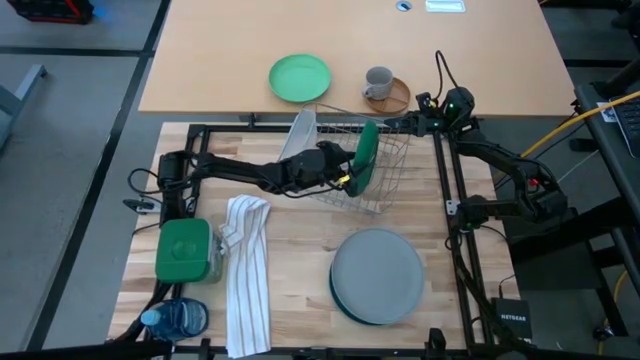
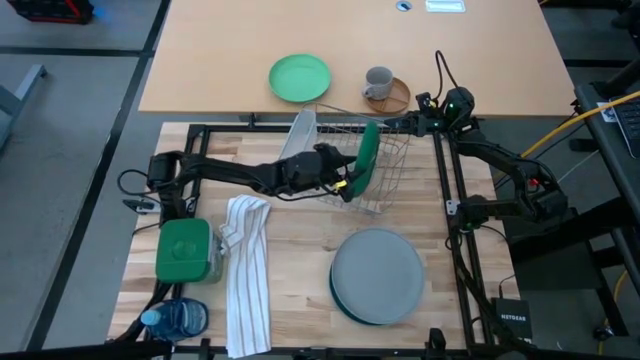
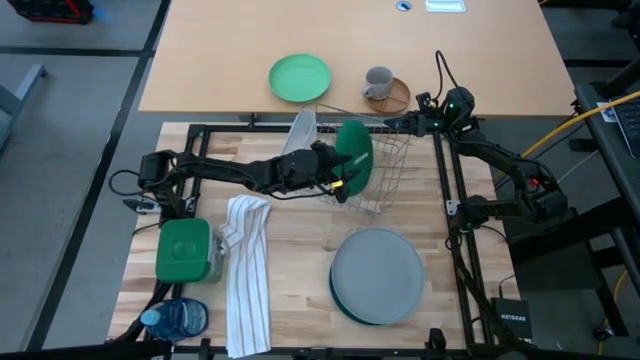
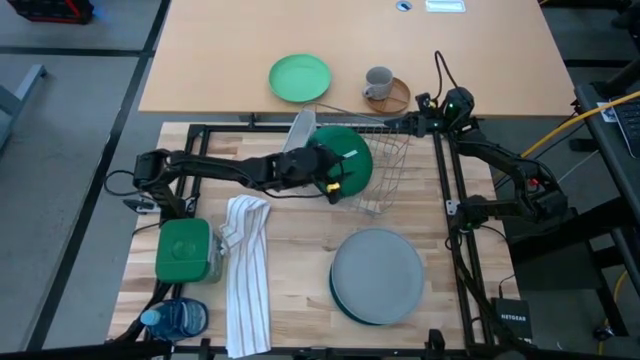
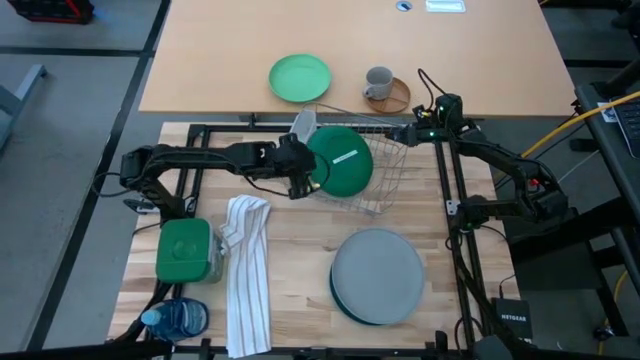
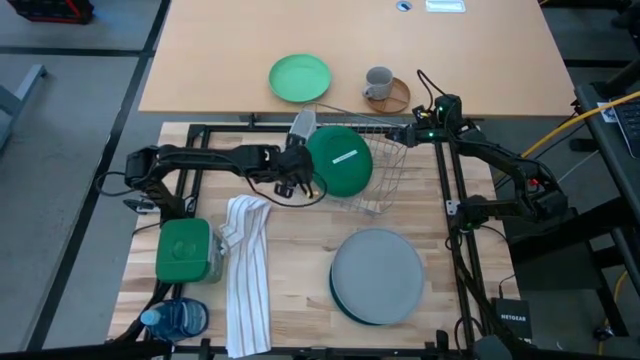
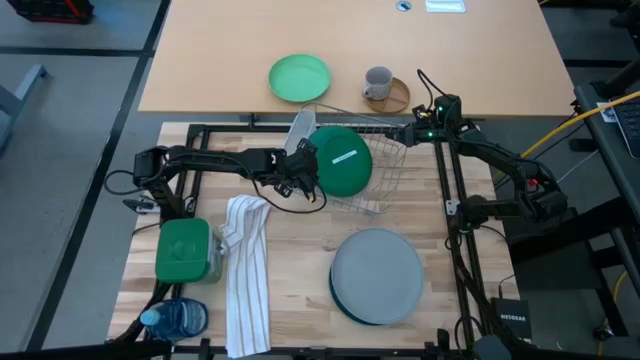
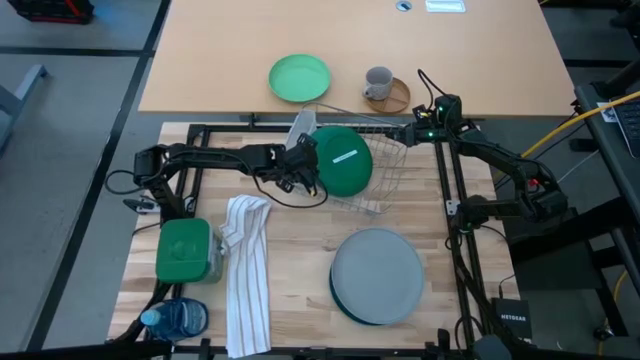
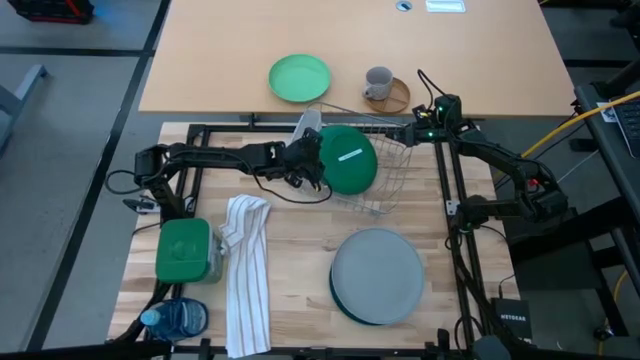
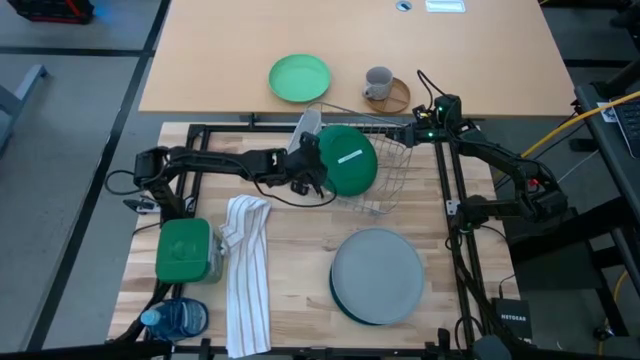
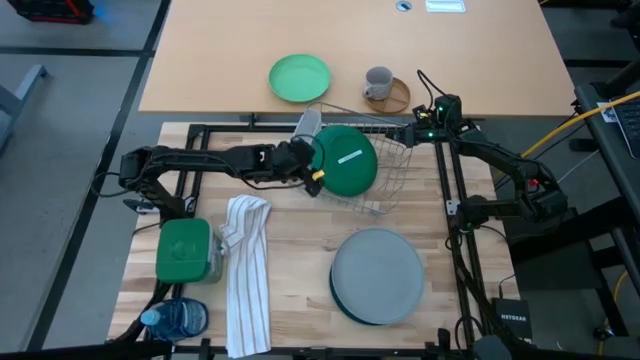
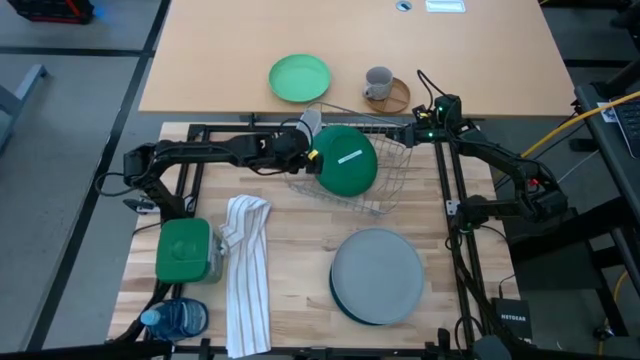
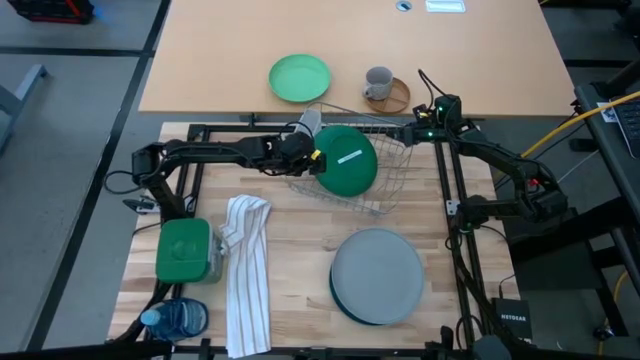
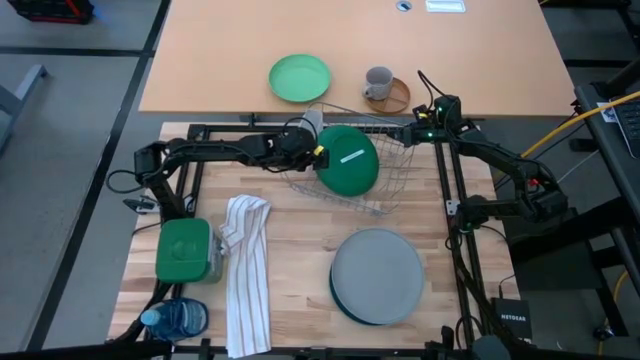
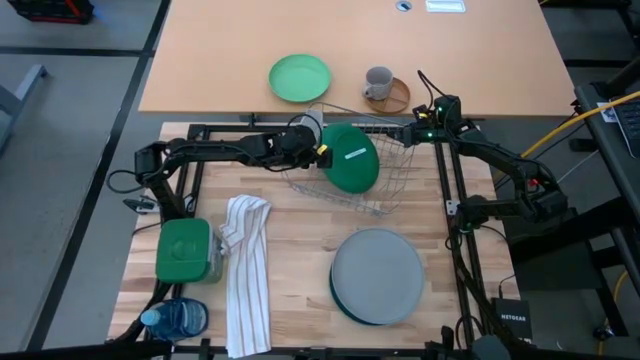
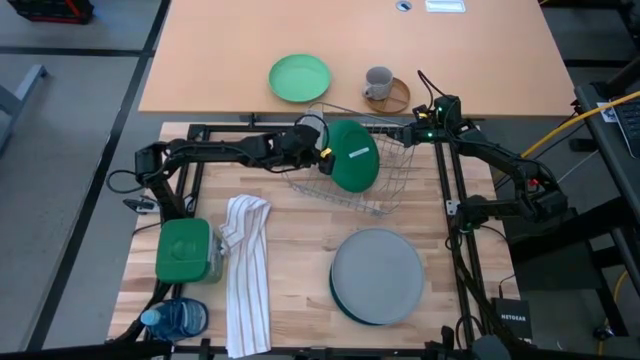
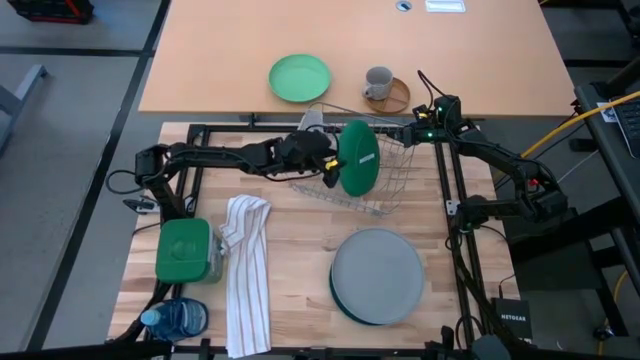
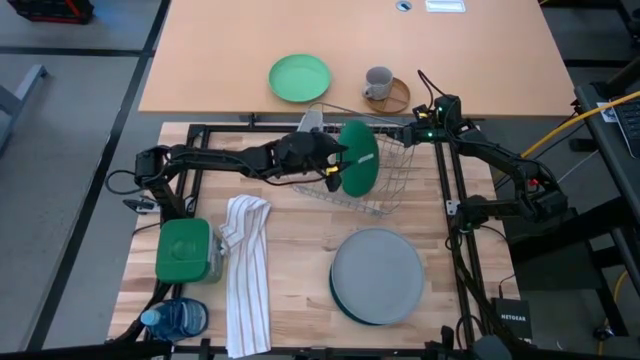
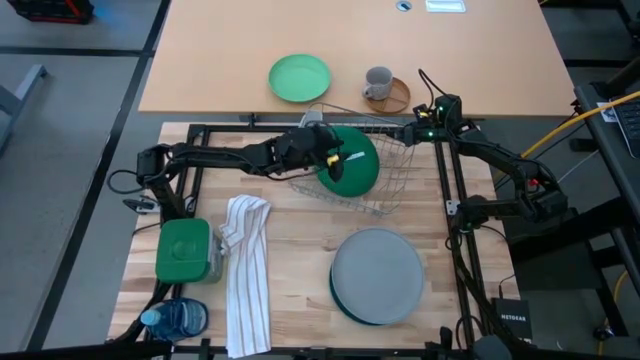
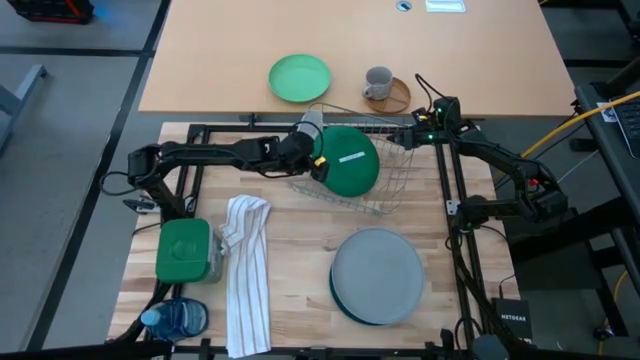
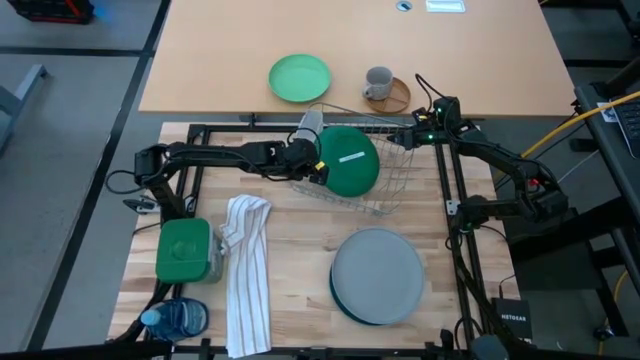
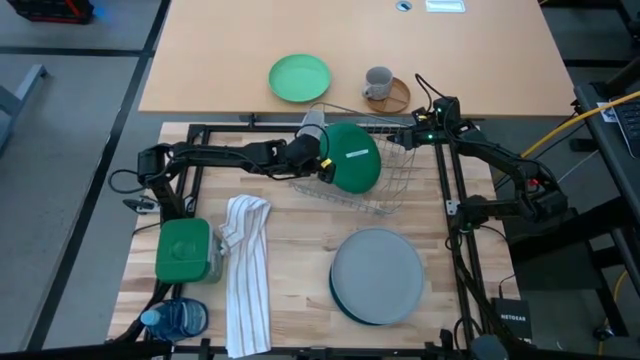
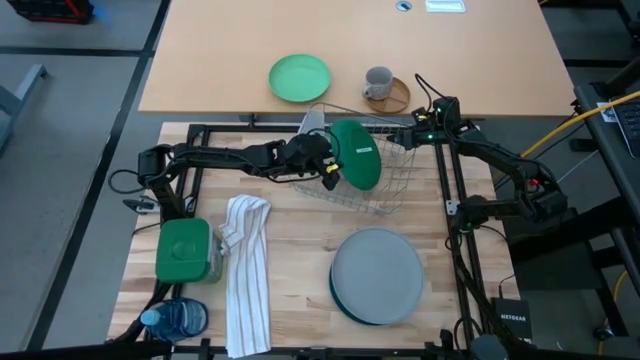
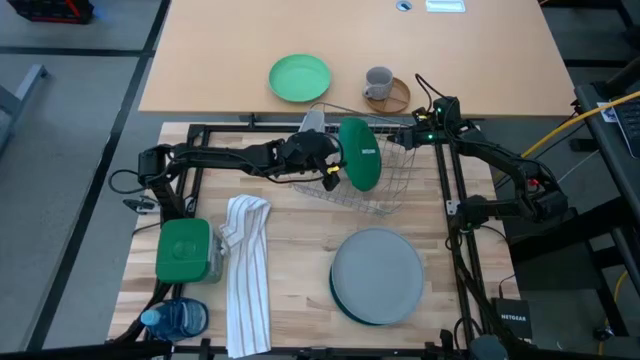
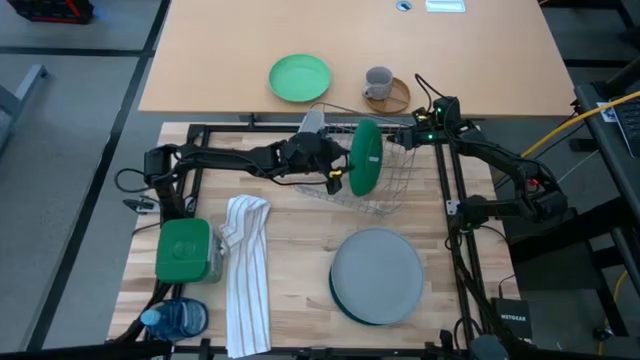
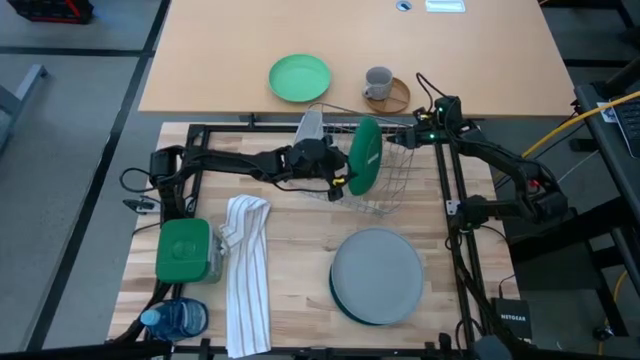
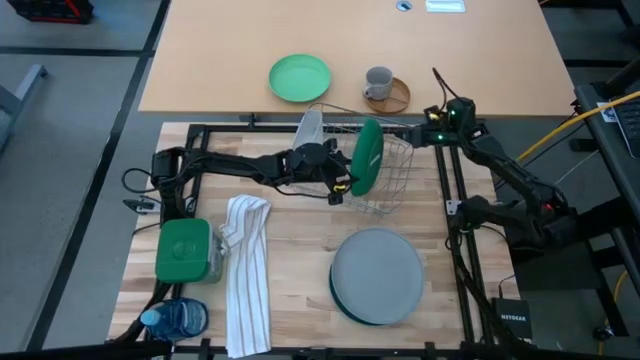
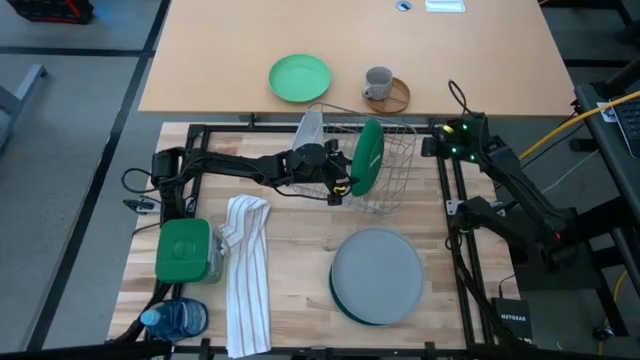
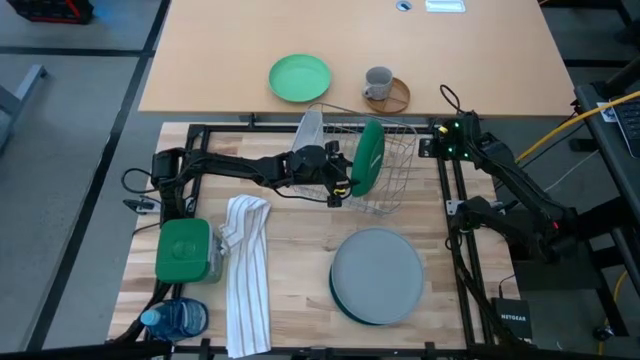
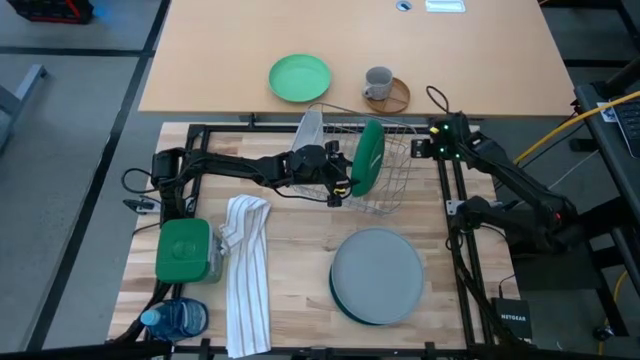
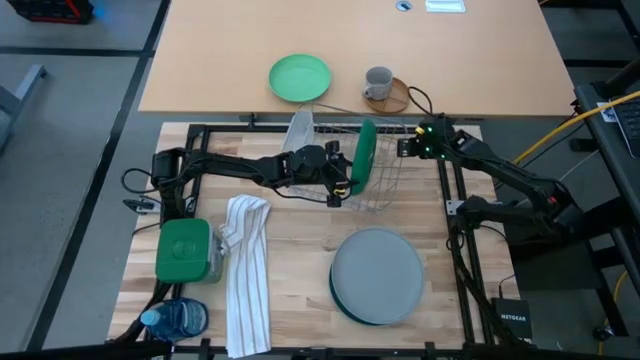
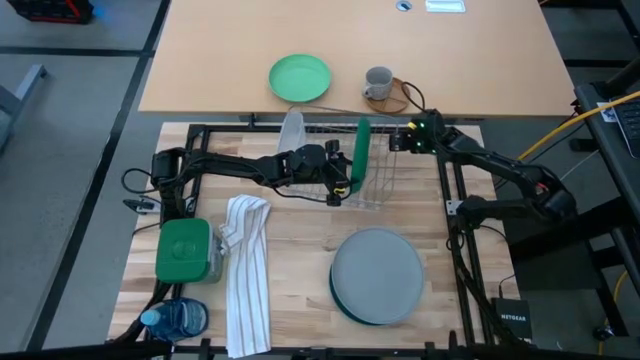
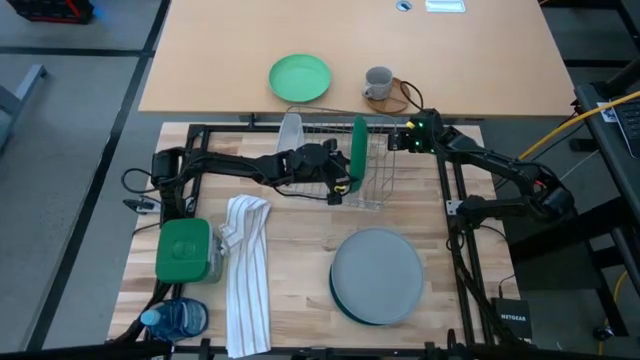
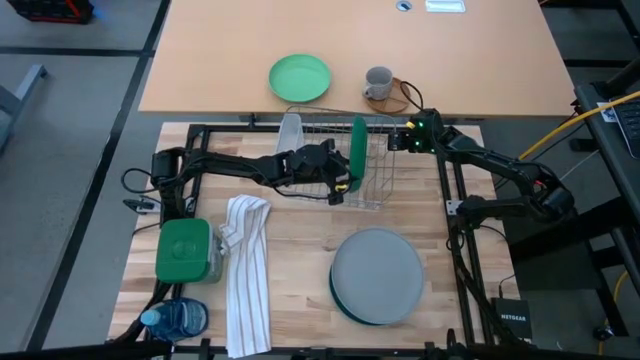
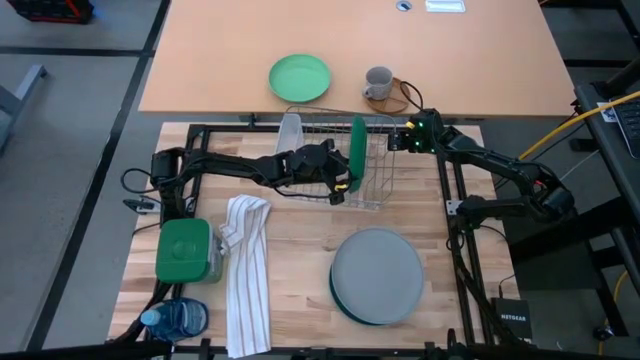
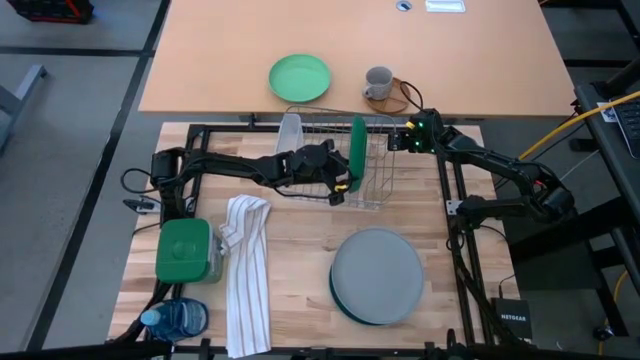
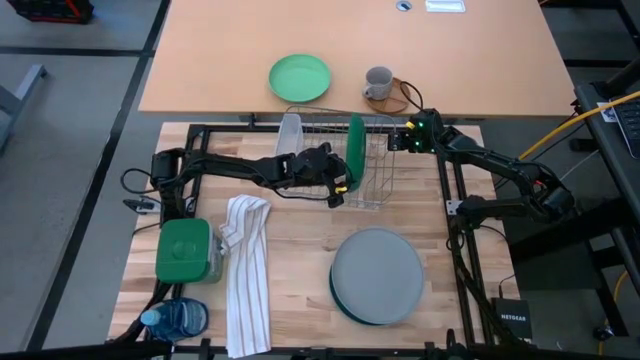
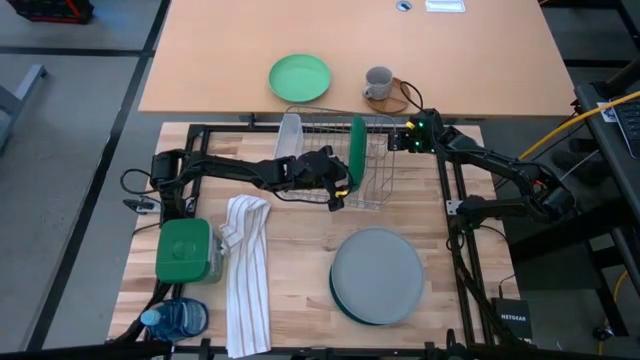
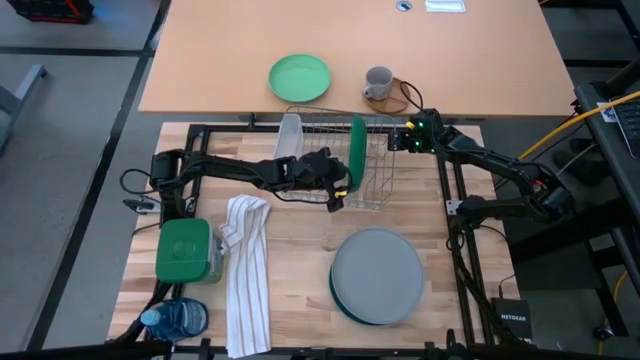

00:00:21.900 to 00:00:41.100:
Task: Sort dishes
Put the dark green plate in the dish rack
